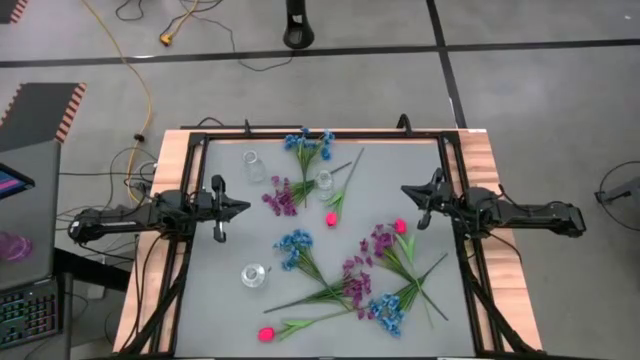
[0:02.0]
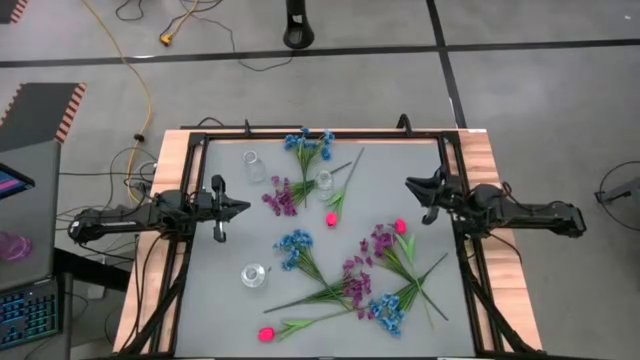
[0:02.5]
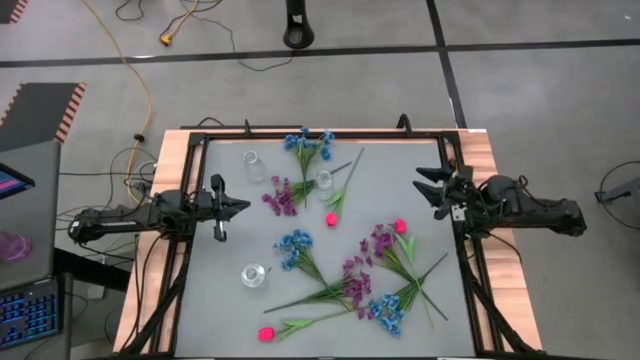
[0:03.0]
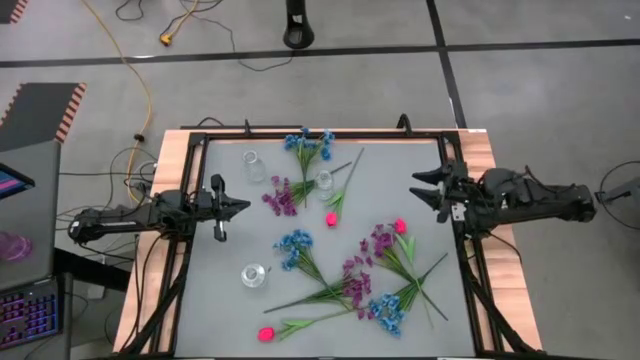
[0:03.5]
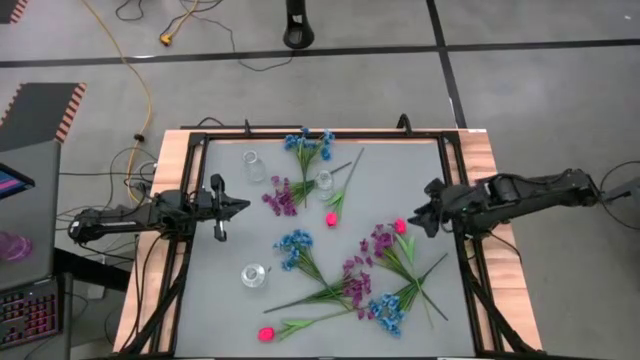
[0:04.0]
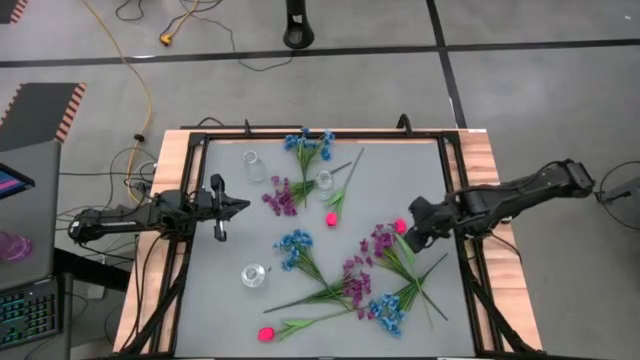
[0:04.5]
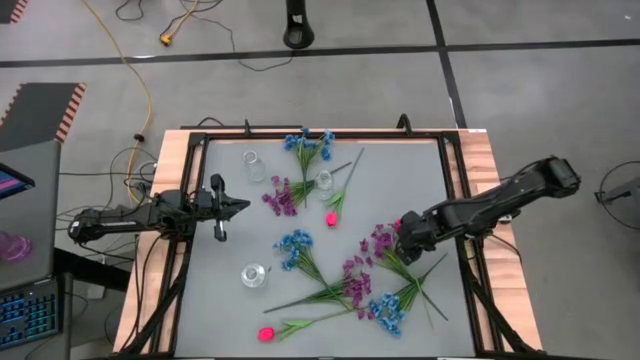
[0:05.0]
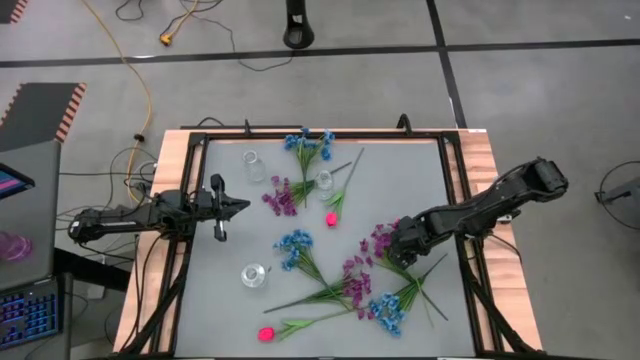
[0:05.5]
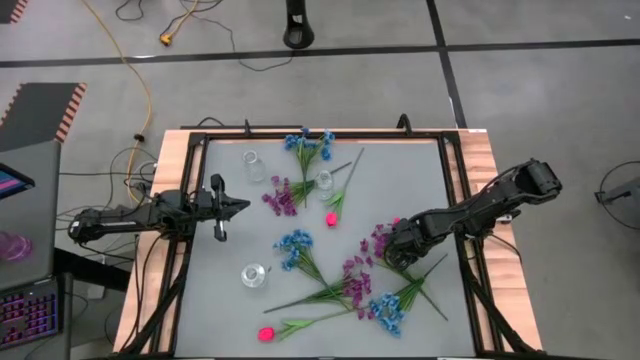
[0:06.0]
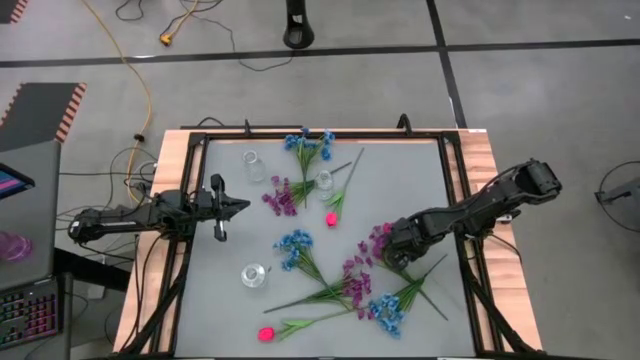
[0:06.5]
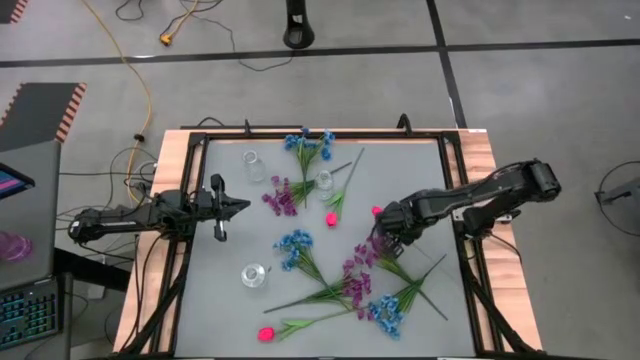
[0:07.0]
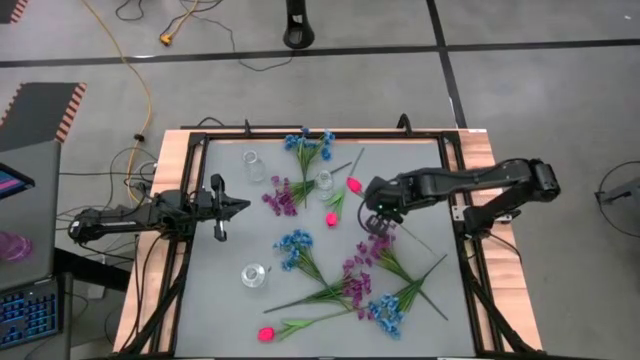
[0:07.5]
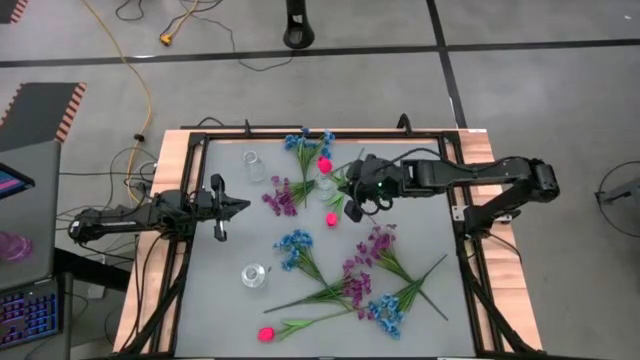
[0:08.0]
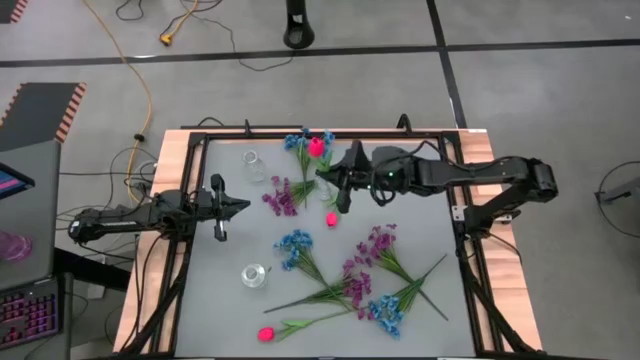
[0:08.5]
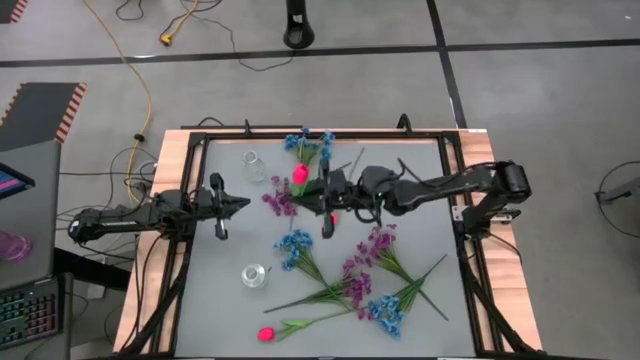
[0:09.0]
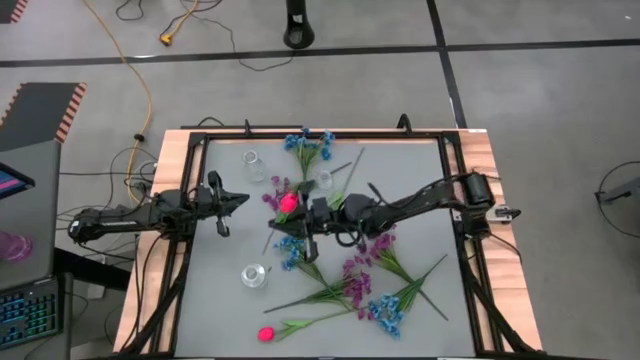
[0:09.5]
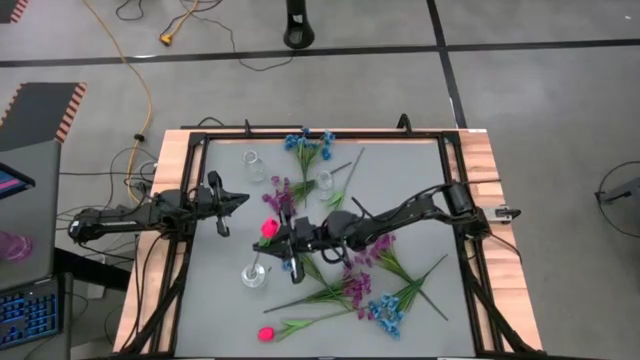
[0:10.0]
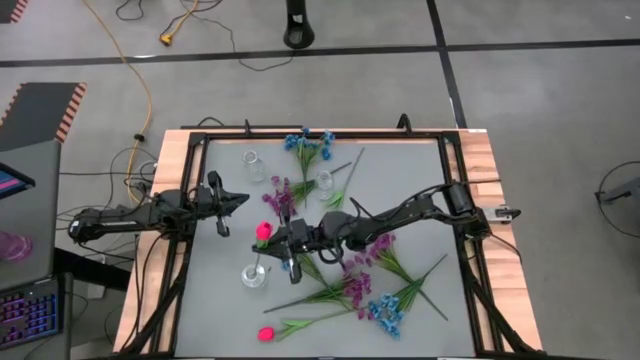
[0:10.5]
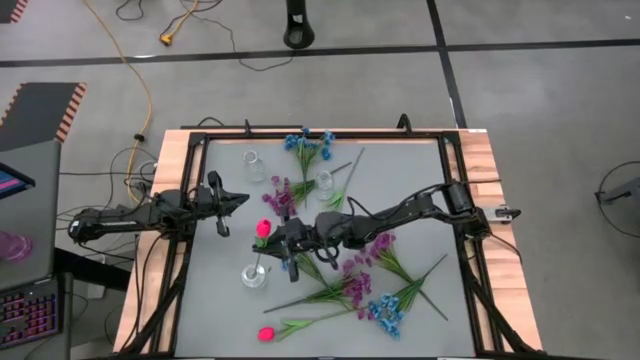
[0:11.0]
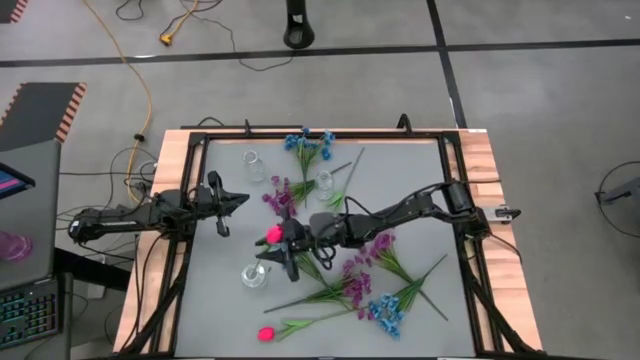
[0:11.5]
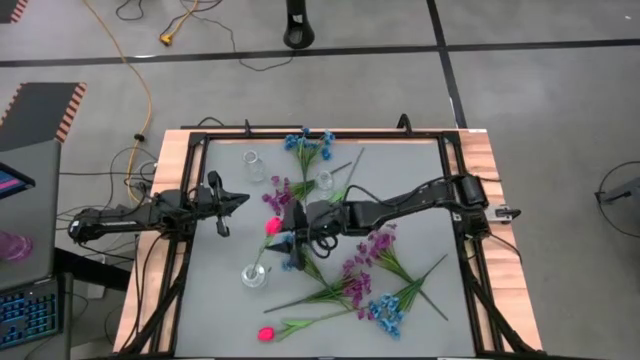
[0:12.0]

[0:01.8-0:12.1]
Task: Sort flowers into vase by color
Put the right red flower into the bottom transparent vase

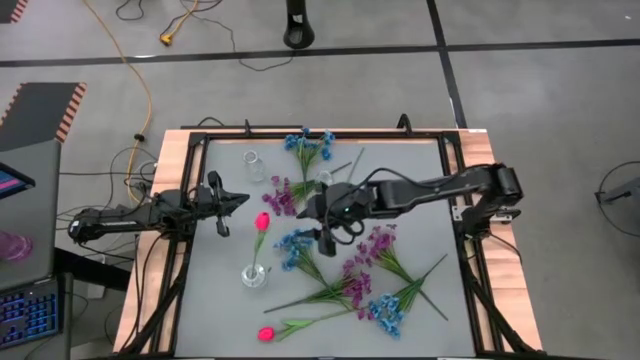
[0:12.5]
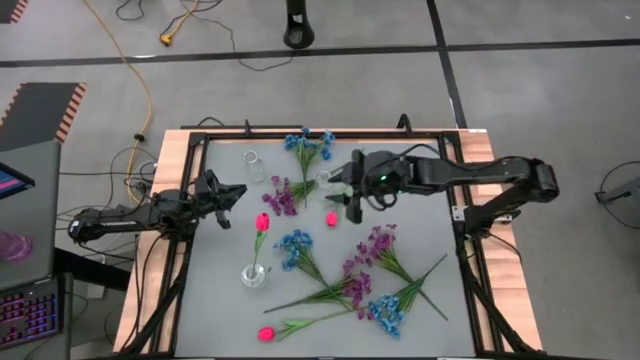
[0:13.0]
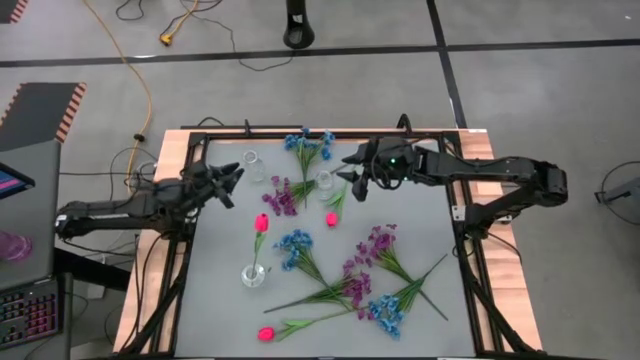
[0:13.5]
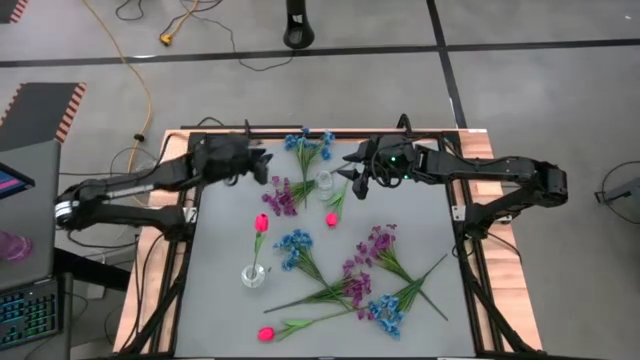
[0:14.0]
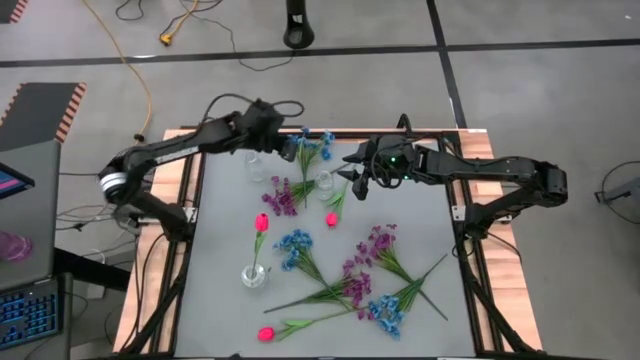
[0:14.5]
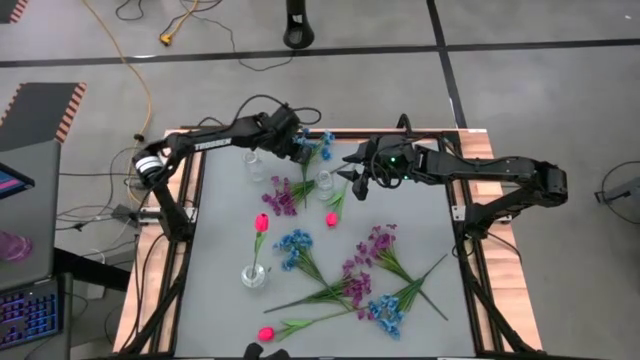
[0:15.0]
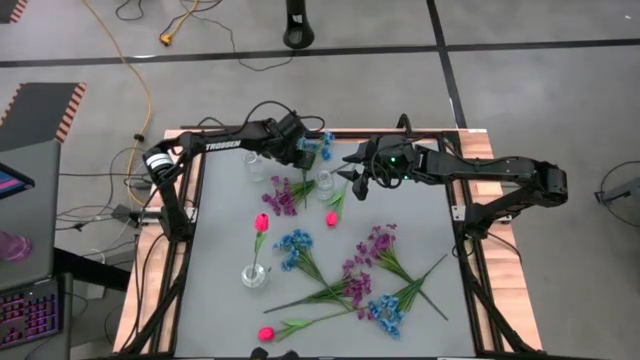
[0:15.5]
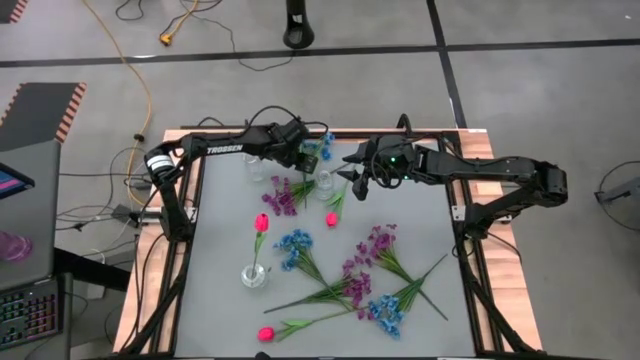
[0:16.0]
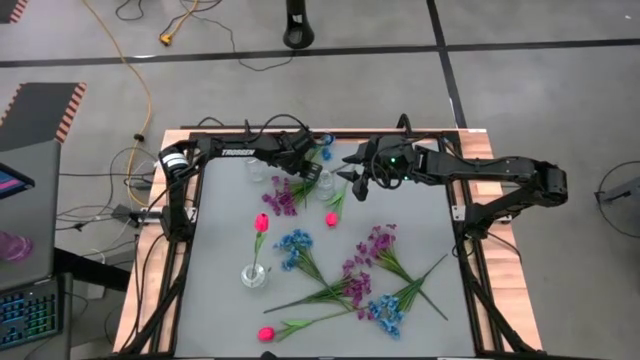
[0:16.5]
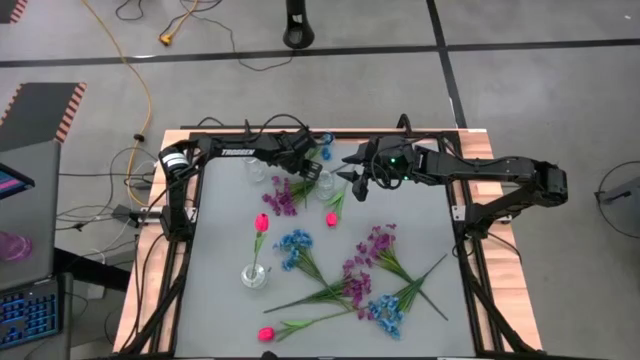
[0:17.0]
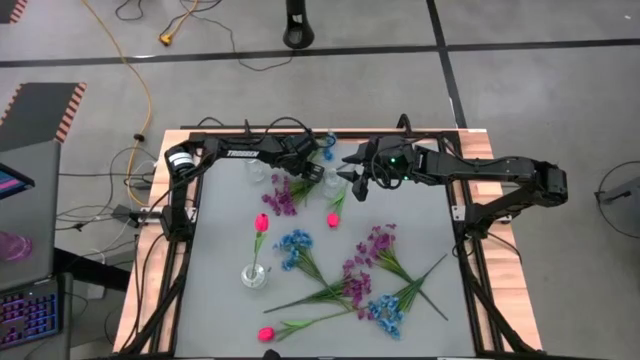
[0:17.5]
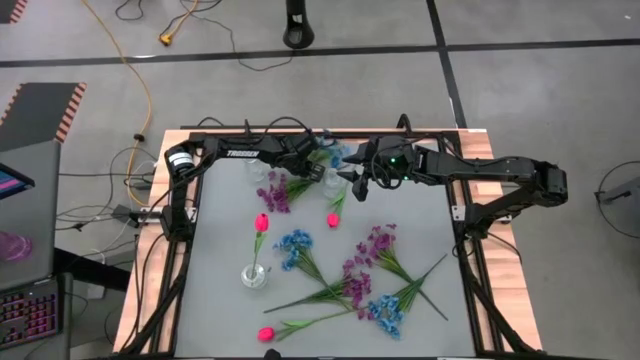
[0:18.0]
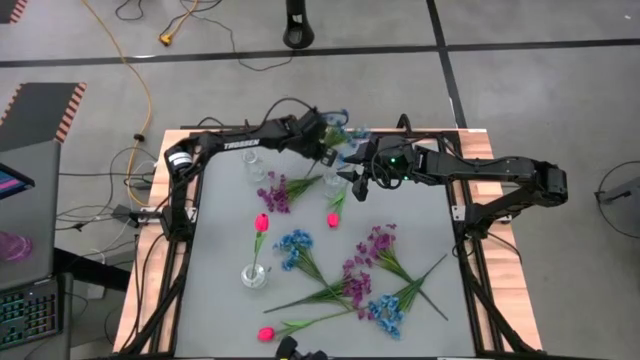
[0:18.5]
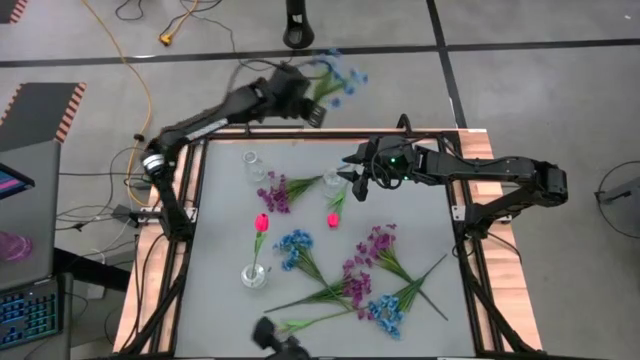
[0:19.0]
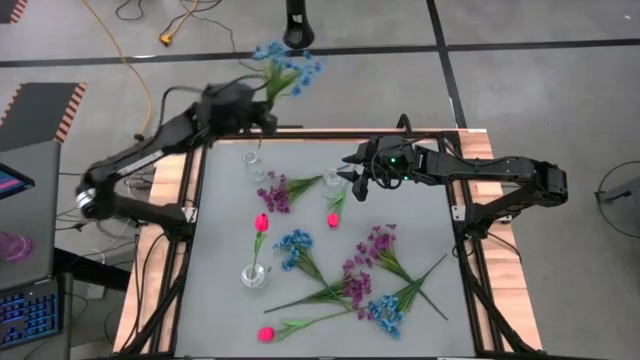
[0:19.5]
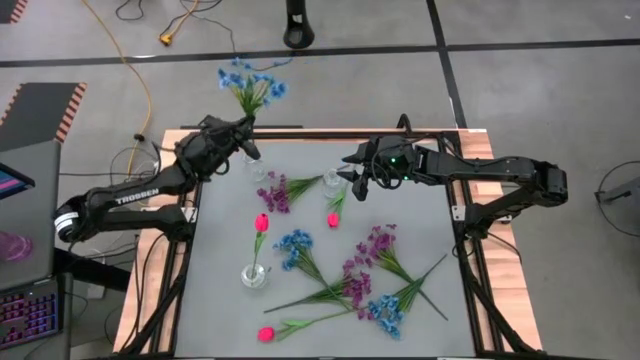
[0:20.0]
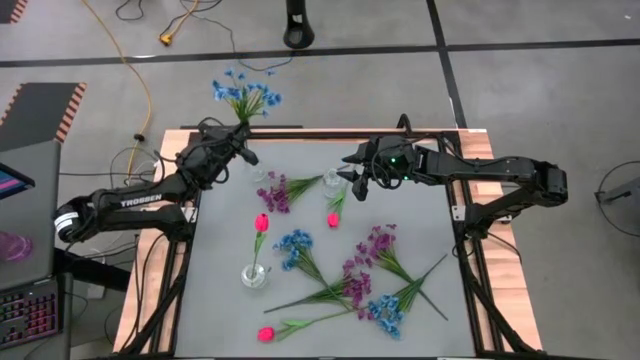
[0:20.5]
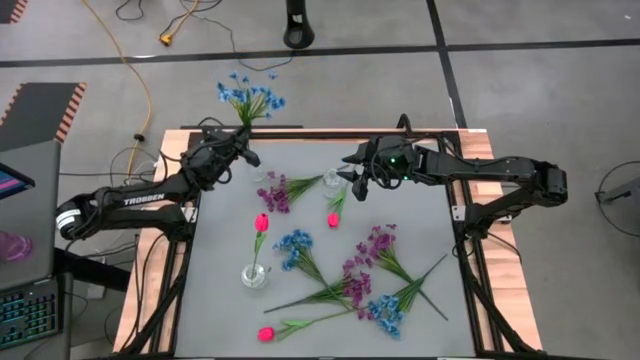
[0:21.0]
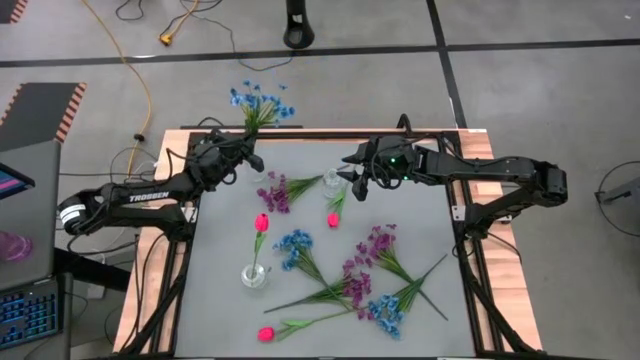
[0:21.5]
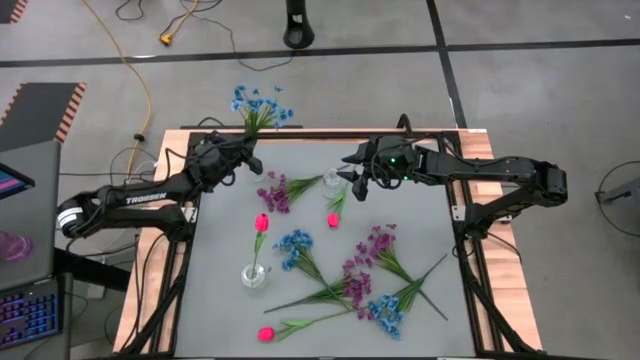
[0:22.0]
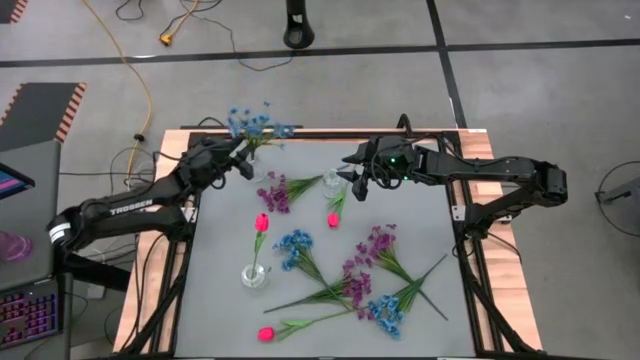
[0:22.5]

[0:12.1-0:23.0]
Put the top blue flower into the top left transparent vase

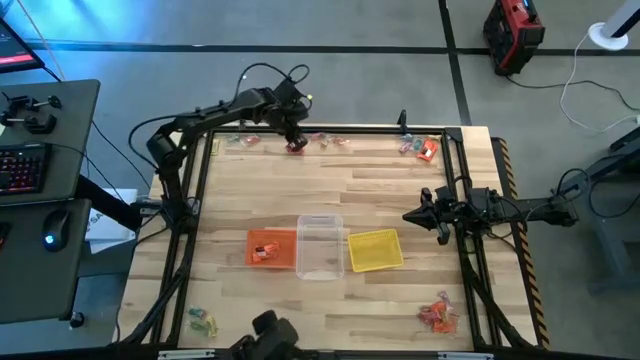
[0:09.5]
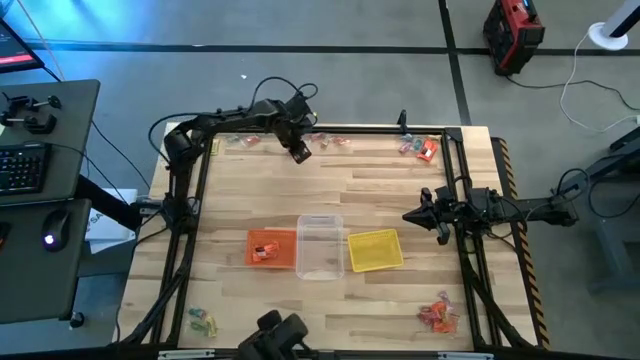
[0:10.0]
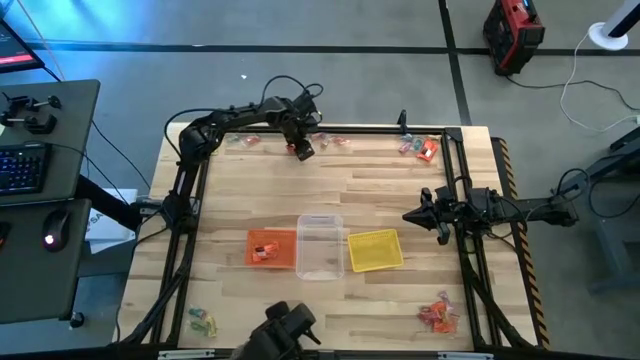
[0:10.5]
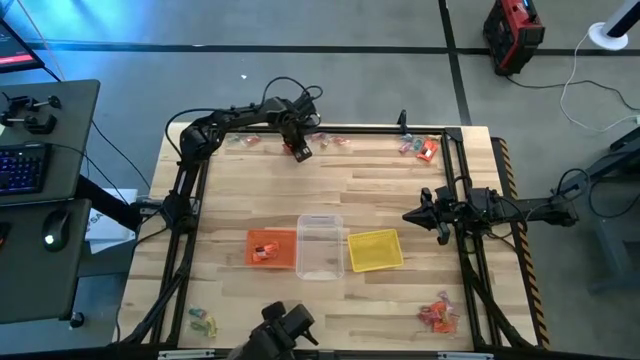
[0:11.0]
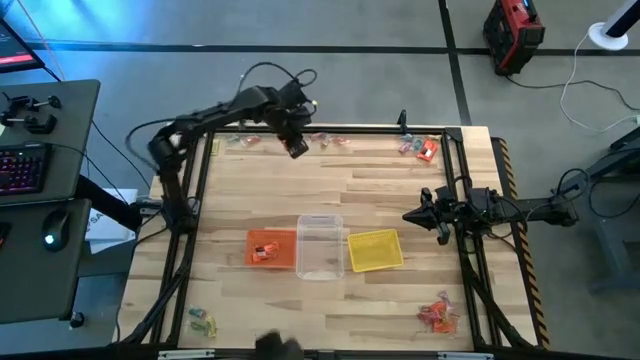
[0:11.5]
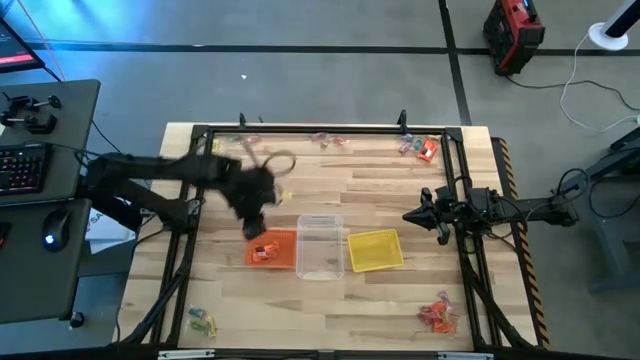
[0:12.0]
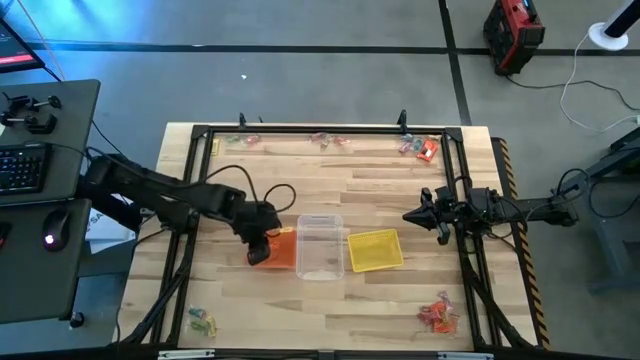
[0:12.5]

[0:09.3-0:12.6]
Task: Sort candy by brand, put in halloween buckets
Put the orange chocolate bar into the orange bin
